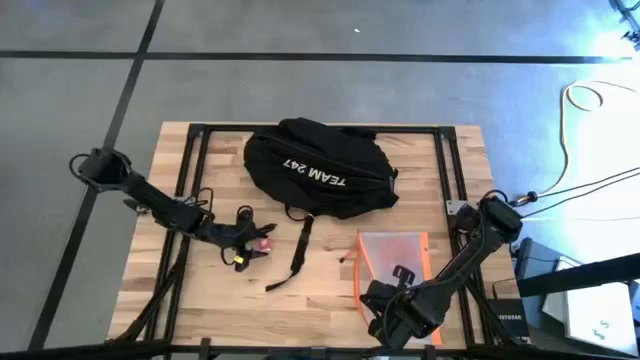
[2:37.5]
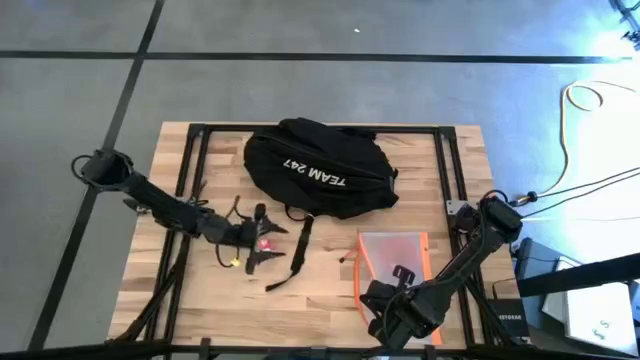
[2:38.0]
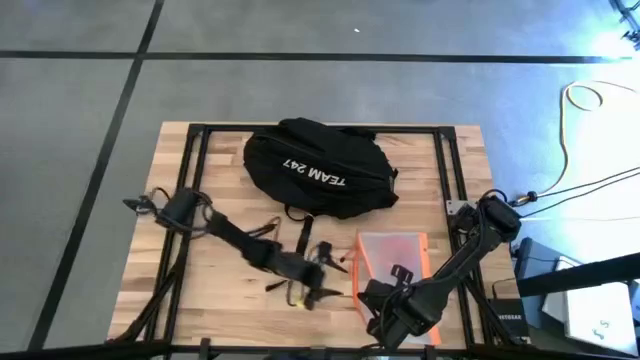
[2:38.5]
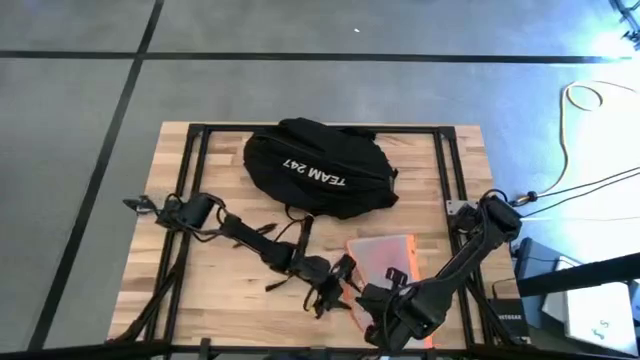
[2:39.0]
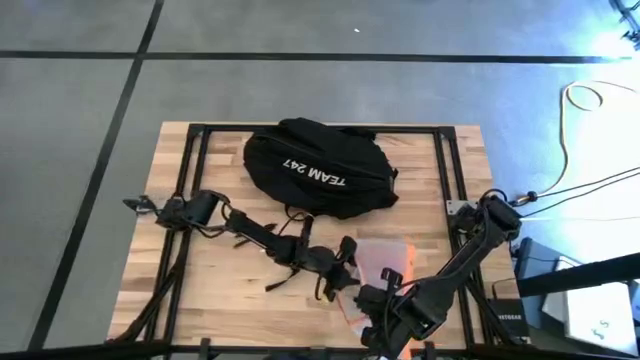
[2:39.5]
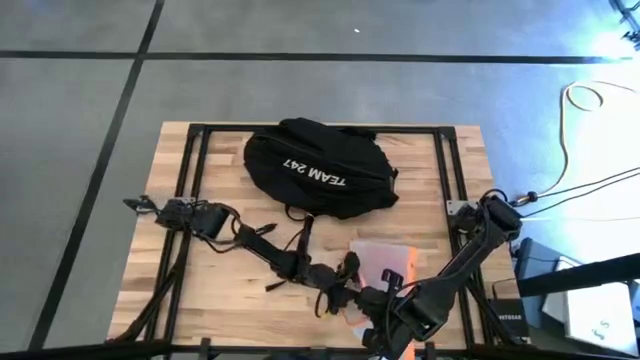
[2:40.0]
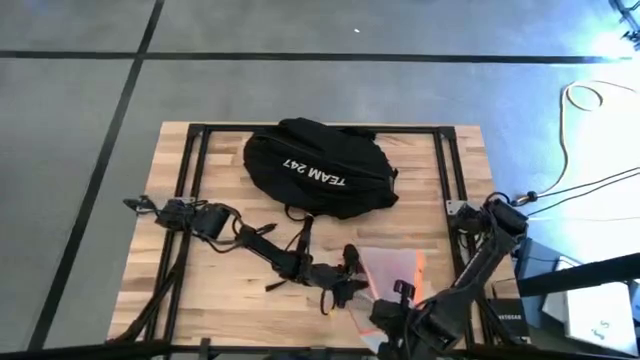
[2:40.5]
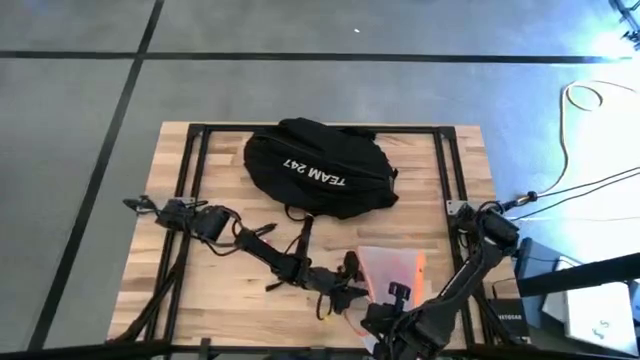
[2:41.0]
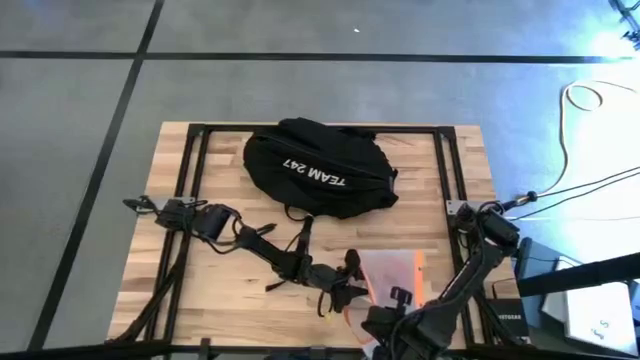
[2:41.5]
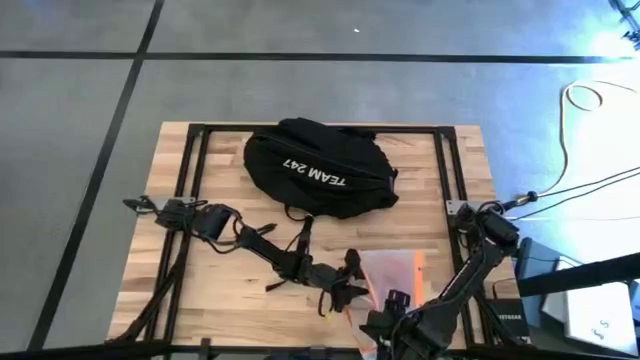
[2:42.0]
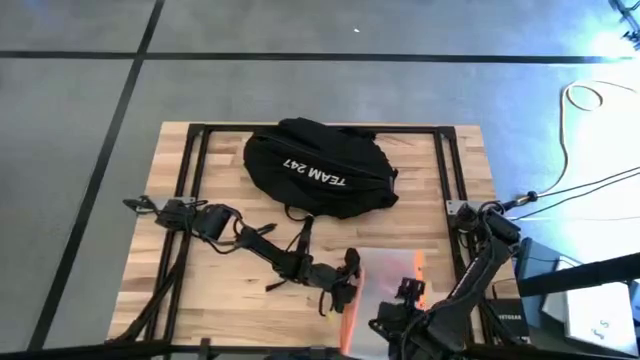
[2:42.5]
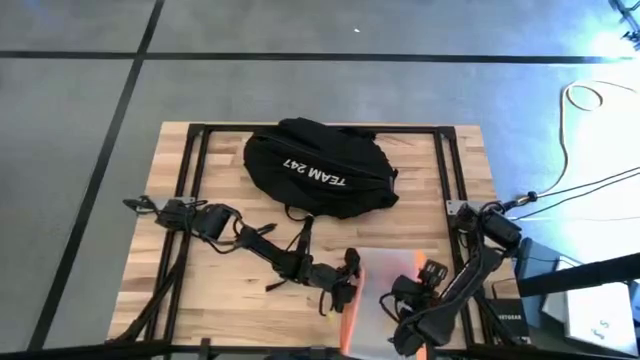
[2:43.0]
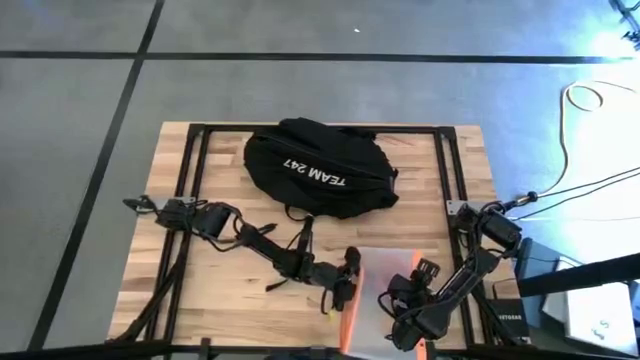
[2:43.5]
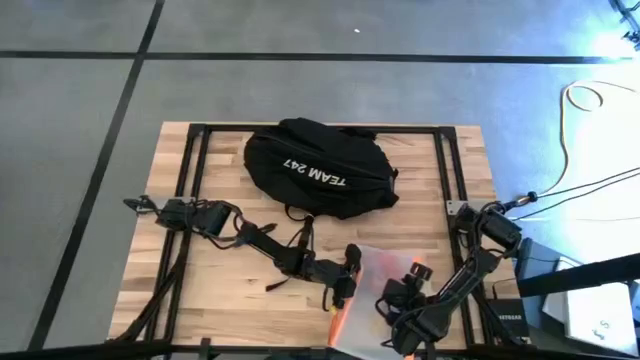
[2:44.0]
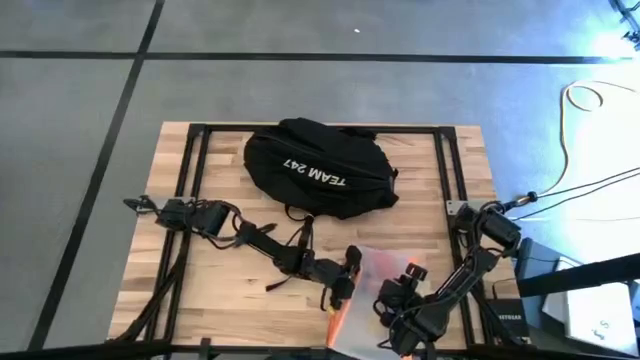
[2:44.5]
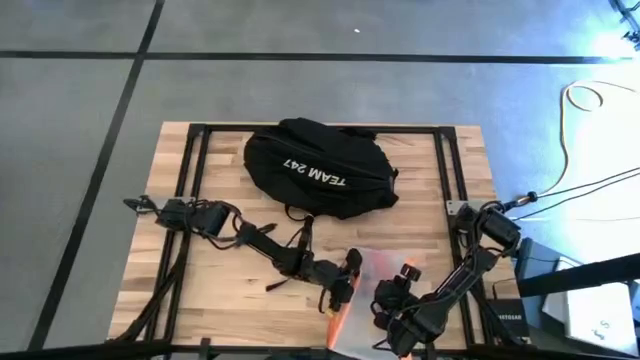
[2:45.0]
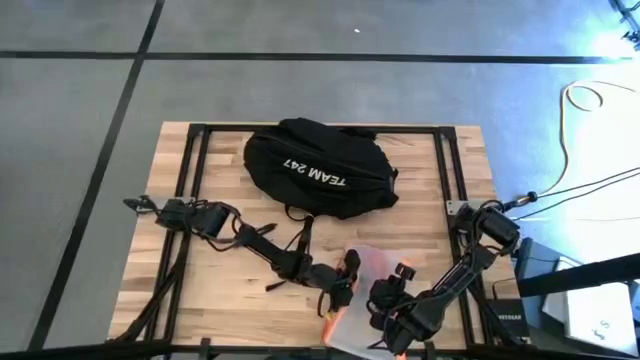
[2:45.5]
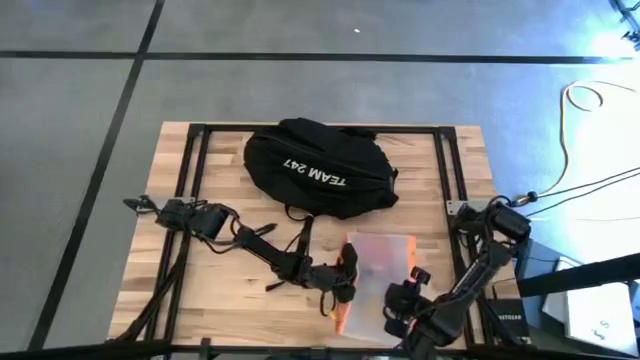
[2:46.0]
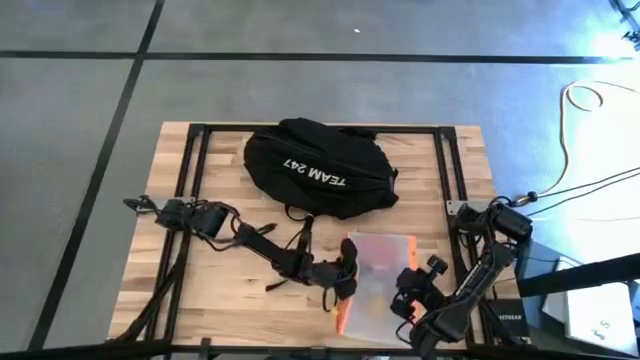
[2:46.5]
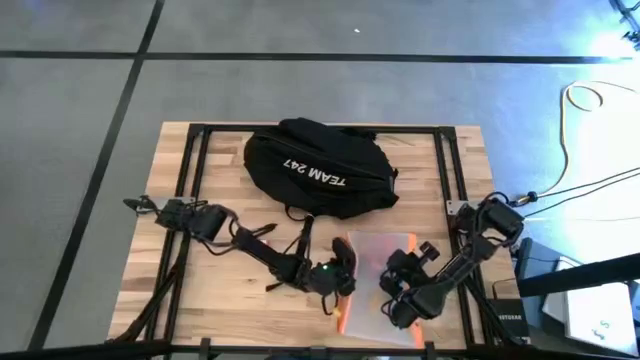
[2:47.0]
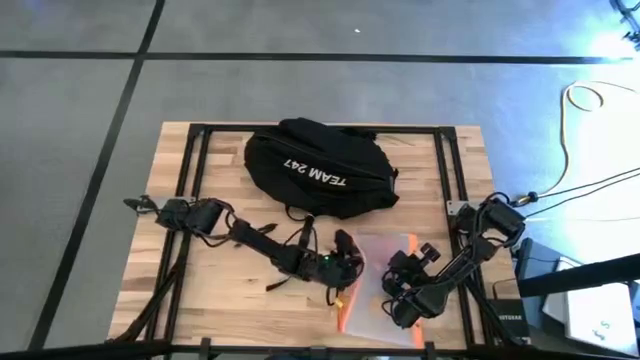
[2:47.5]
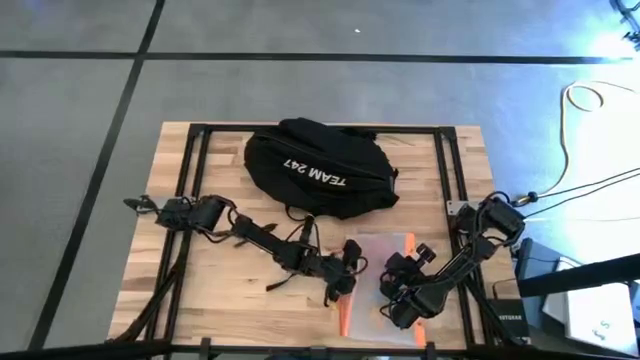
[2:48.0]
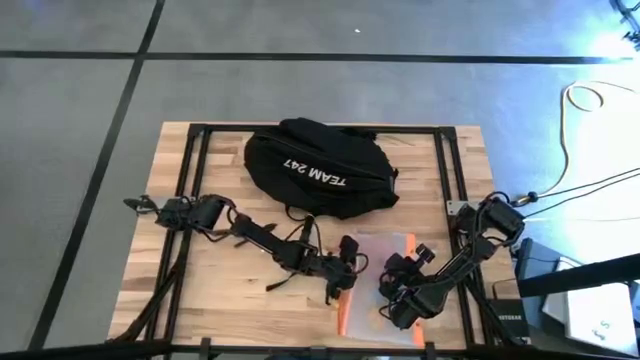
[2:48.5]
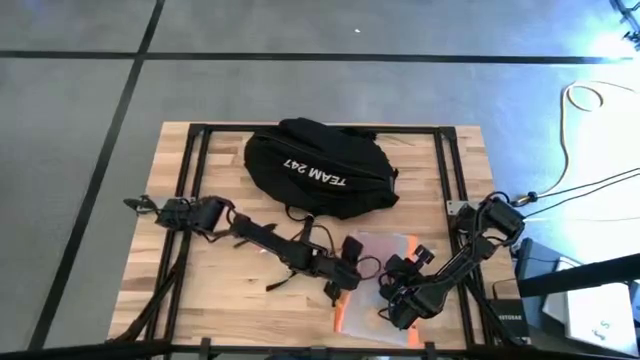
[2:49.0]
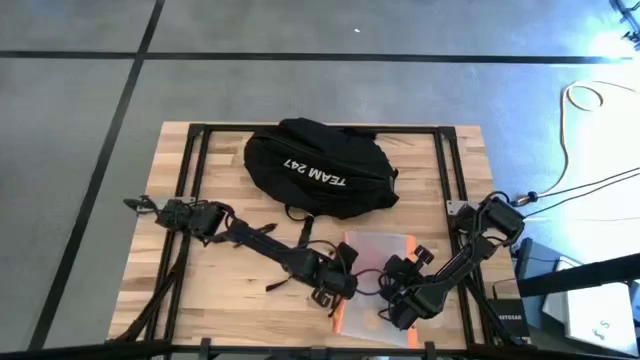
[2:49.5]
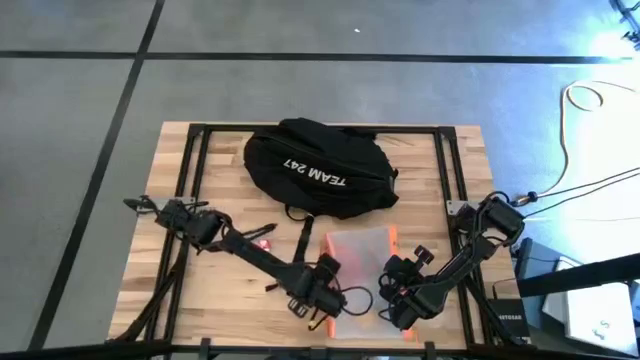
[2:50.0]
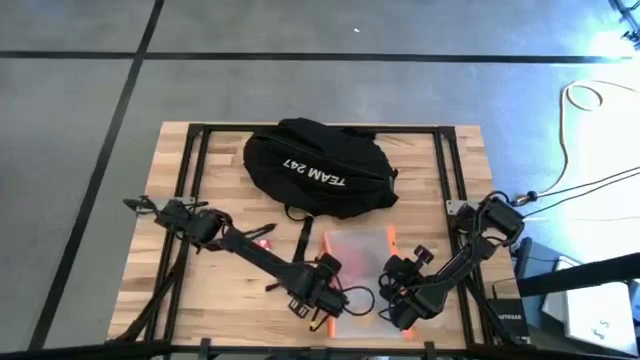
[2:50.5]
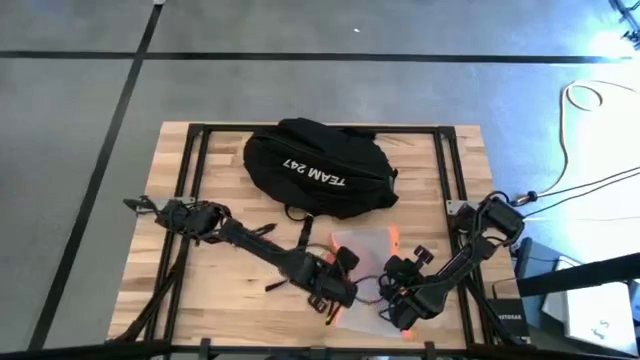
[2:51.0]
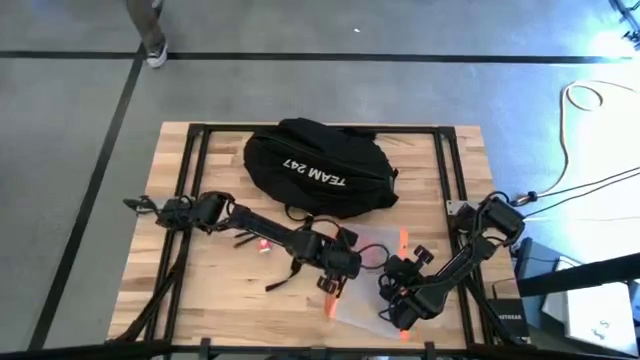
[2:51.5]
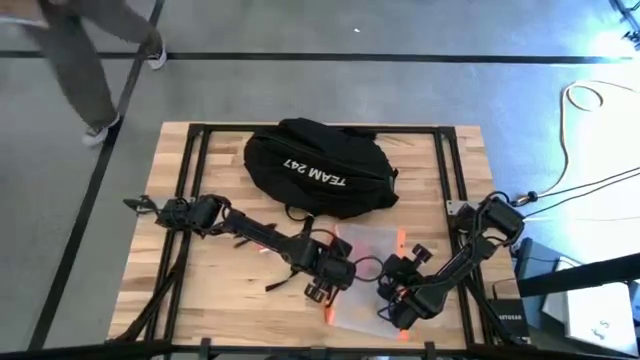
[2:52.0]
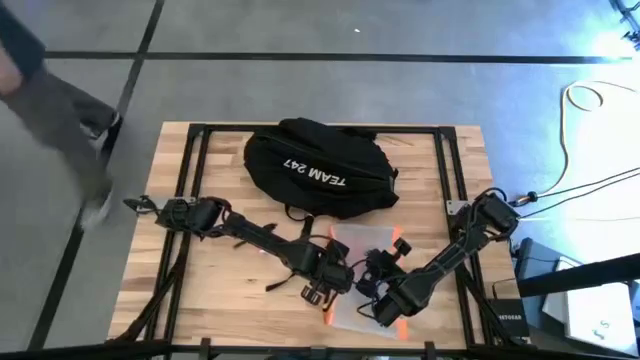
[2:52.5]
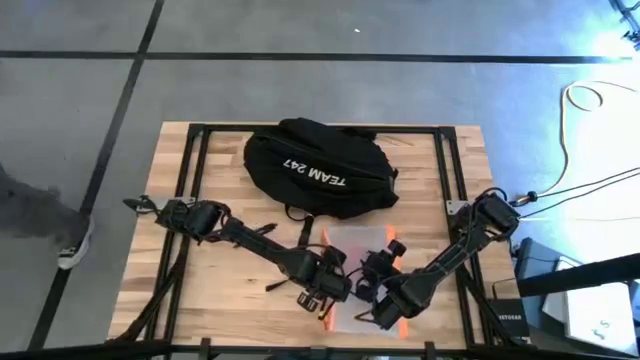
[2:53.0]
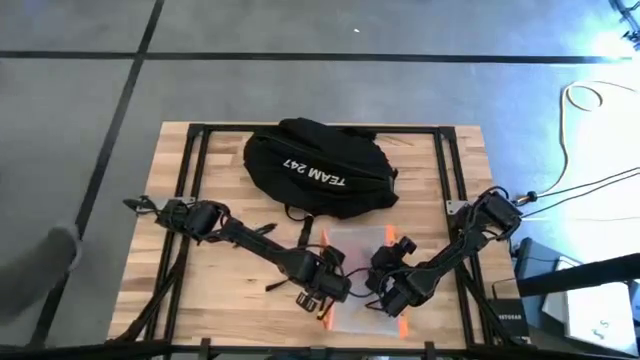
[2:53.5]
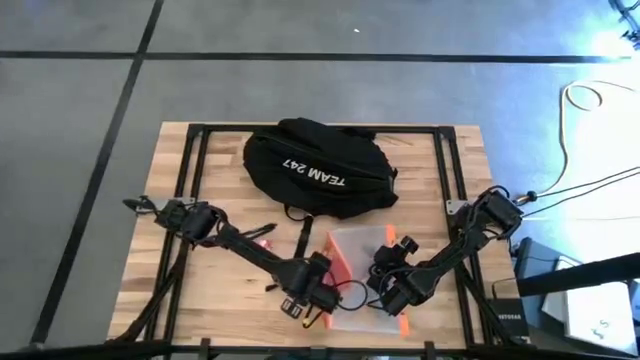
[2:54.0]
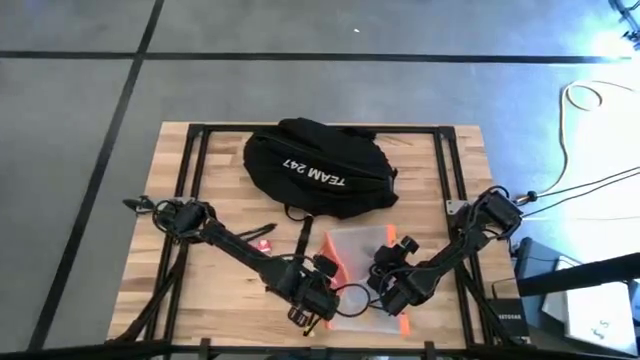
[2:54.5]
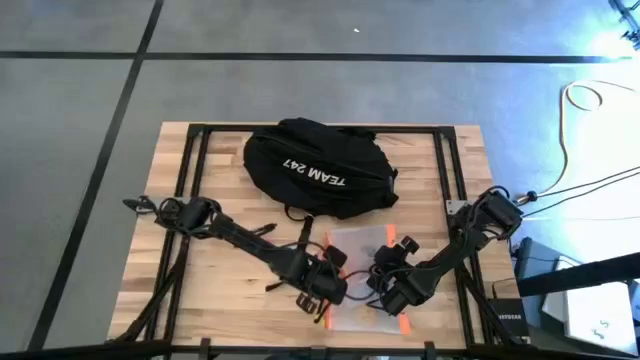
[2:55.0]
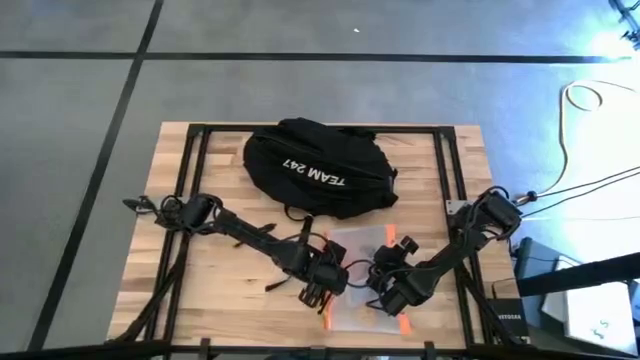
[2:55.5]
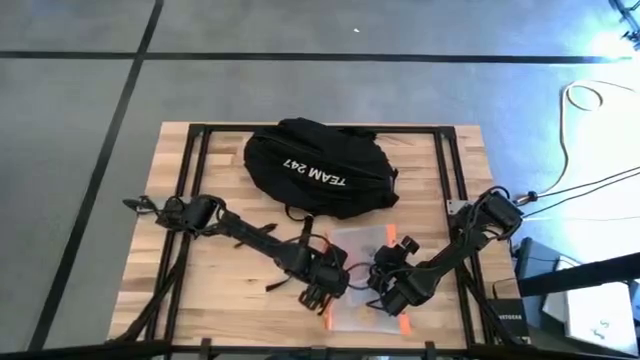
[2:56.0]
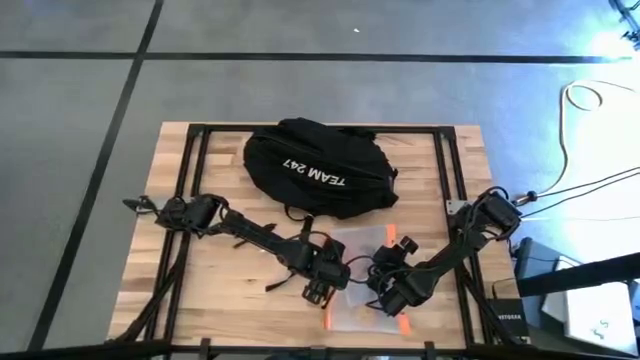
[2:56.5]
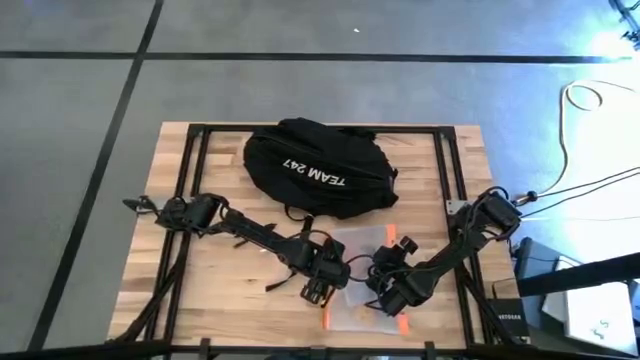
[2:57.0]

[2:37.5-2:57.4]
Task: Unpack backpack
Remove the pink medicine organizer from the transparent white zip bag

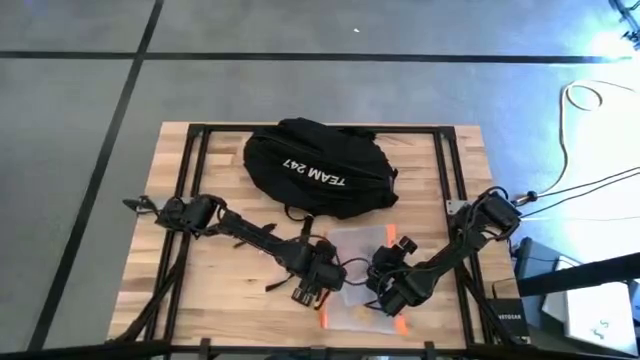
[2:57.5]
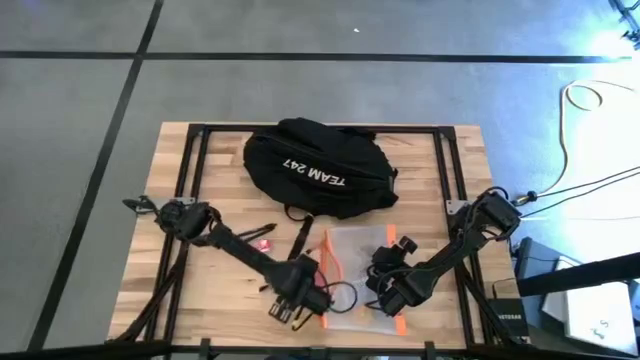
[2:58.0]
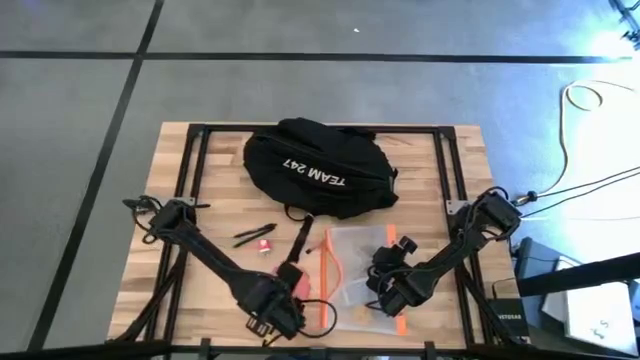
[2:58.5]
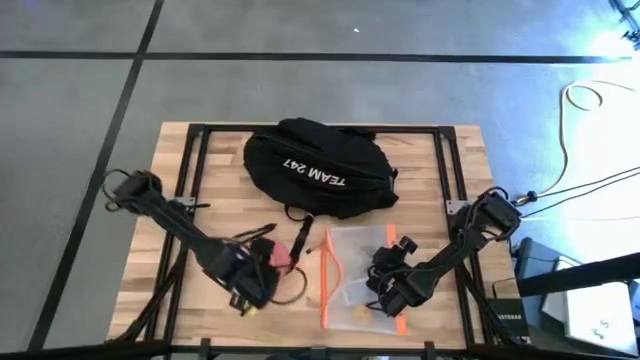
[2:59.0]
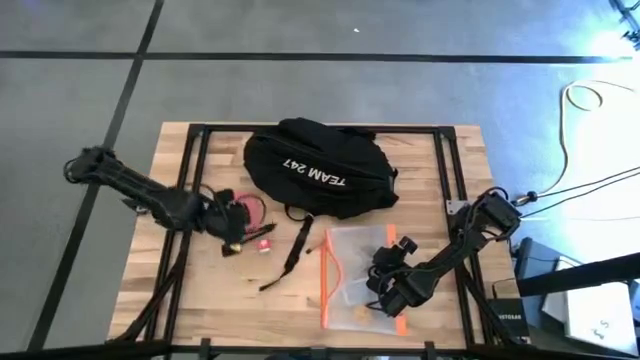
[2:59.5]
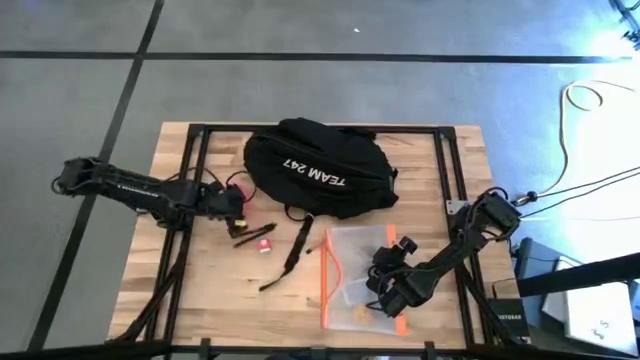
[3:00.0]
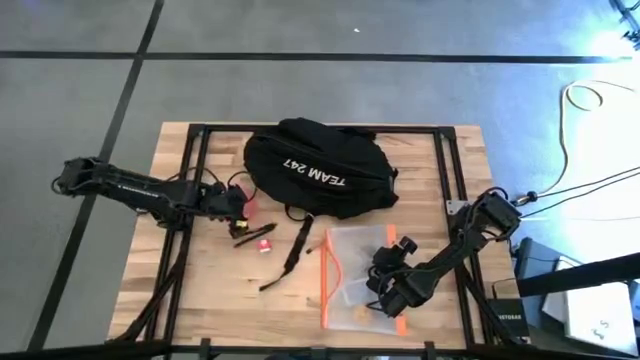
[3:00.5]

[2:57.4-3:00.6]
Remove the pink medicine organizer from the transparent white zip bag
